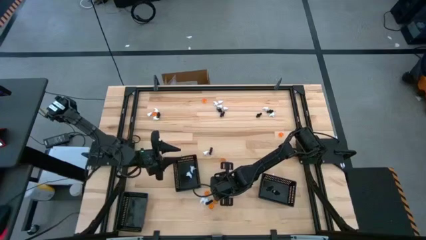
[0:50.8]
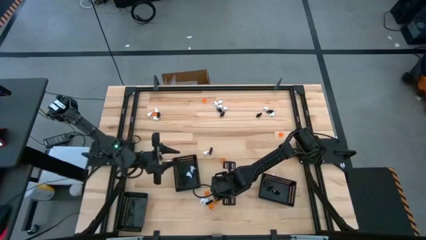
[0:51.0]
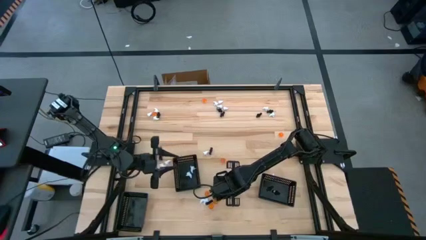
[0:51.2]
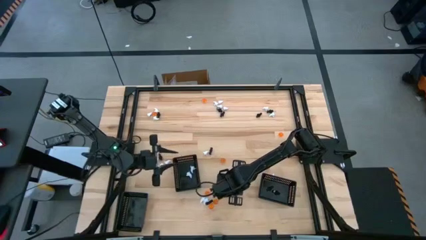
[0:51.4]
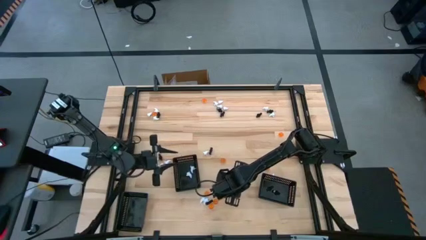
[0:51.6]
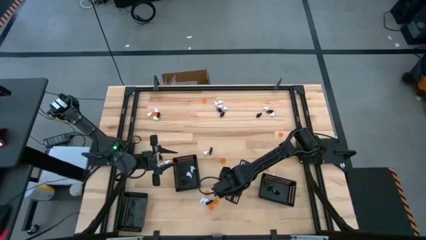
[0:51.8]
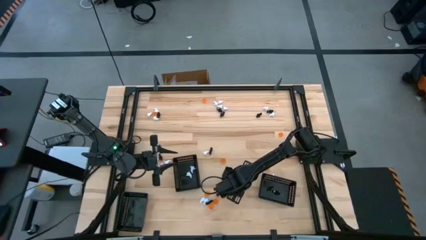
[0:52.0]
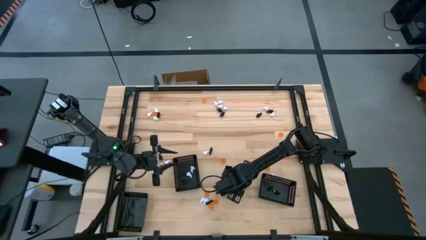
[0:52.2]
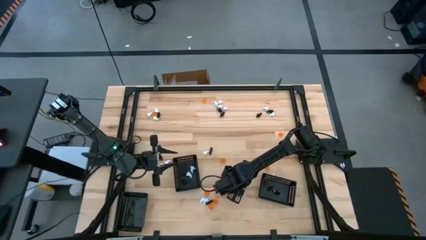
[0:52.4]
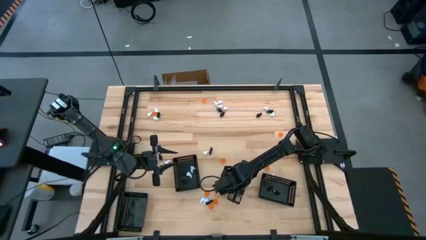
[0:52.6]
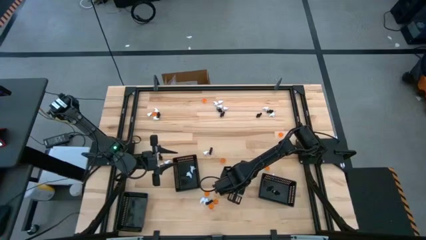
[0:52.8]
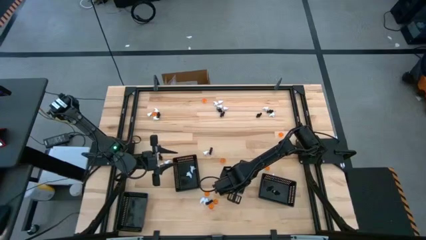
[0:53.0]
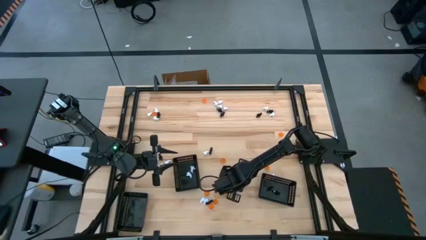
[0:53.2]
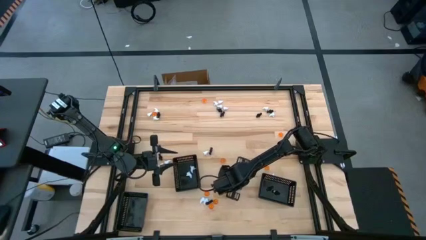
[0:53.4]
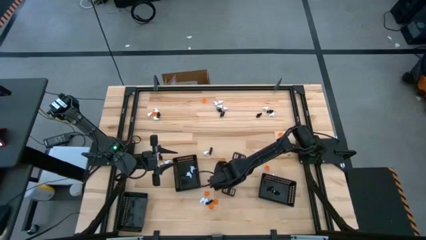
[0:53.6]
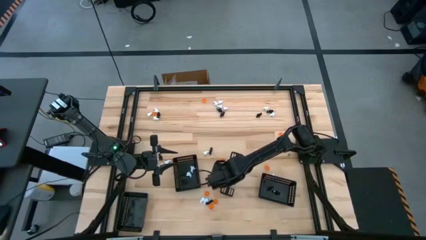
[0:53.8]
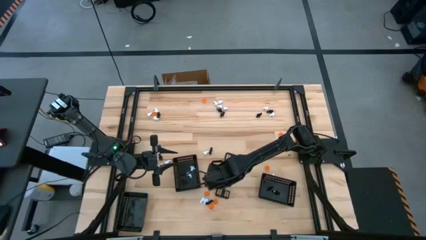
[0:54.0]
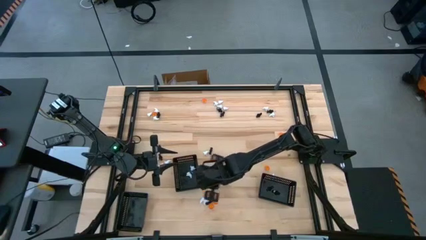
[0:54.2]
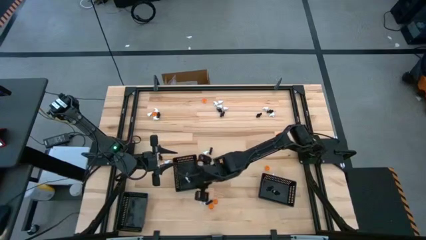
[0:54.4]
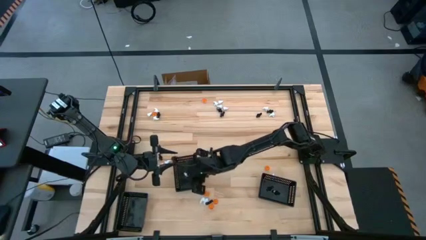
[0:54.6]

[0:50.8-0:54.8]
Task: Sort Halloween decoration
Put the white ghost toy into the middle black basket

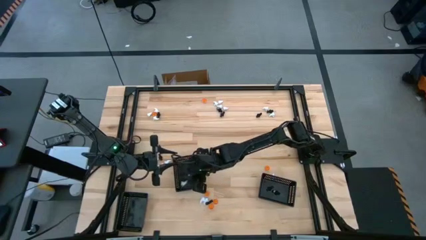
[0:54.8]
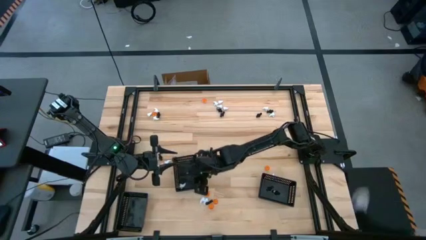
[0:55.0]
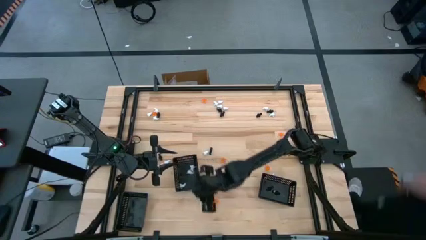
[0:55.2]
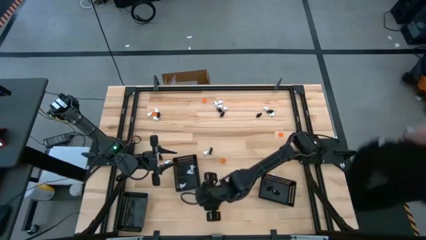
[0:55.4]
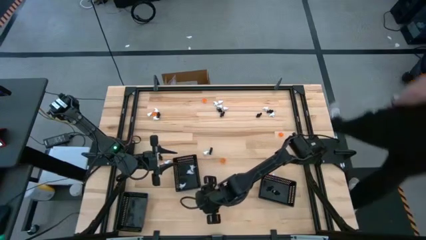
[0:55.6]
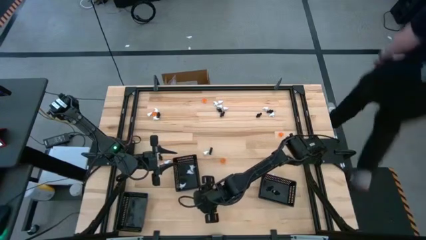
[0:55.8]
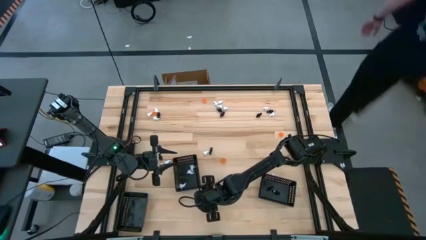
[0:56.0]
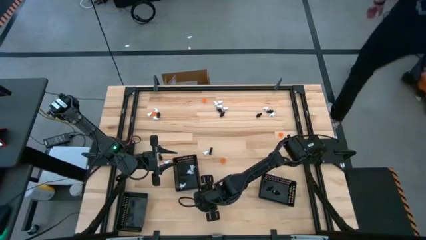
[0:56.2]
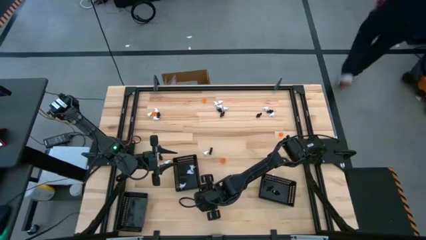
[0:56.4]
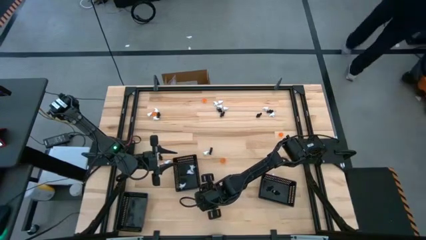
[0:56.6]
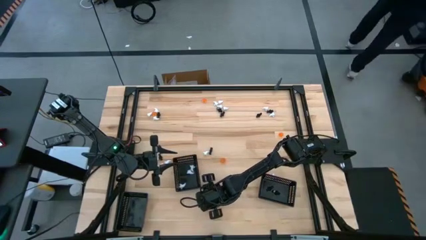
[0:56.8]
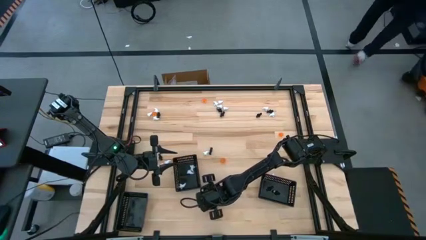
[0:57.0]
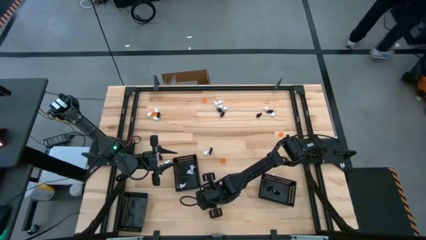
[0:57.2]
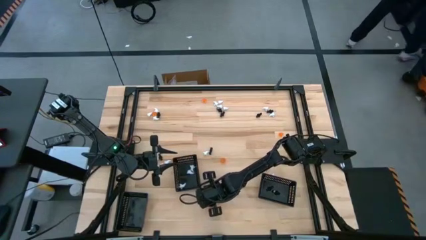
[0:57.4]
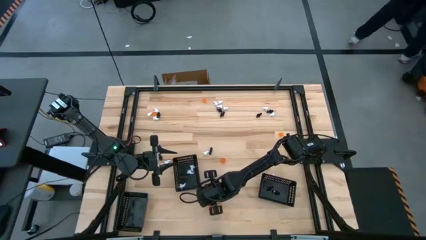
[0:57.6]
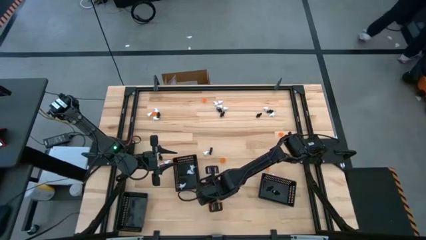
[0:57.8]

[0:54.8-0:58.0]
Put the orange pumpkin toy into the left black basket

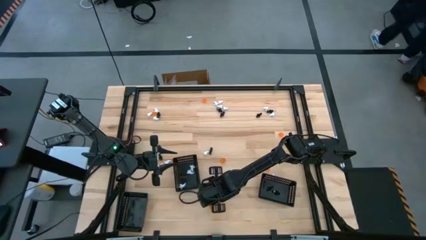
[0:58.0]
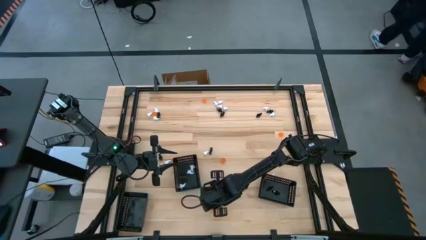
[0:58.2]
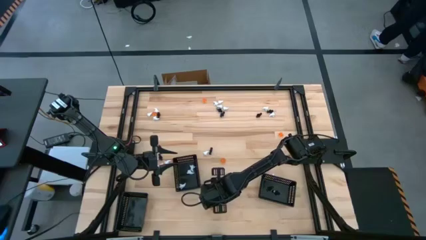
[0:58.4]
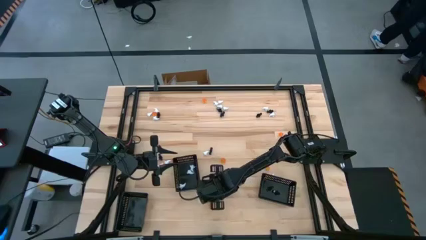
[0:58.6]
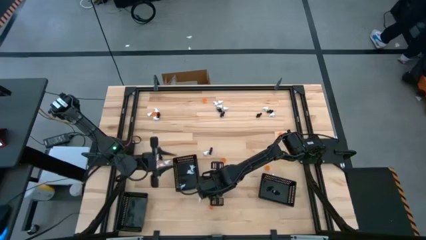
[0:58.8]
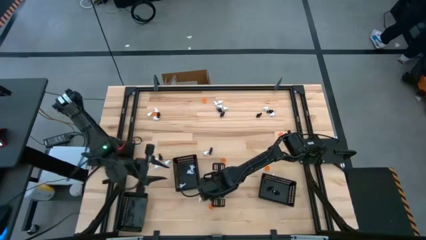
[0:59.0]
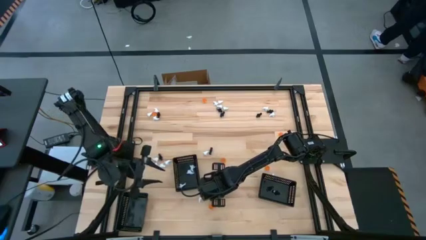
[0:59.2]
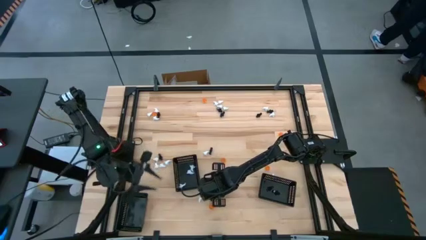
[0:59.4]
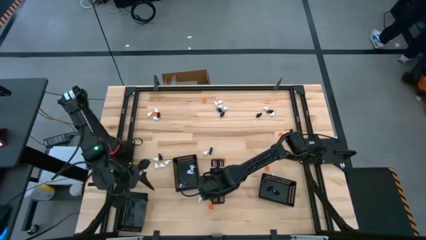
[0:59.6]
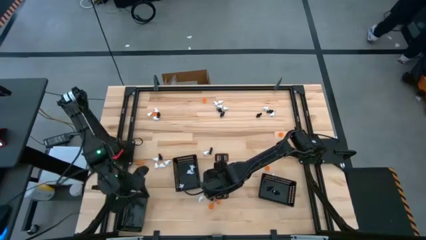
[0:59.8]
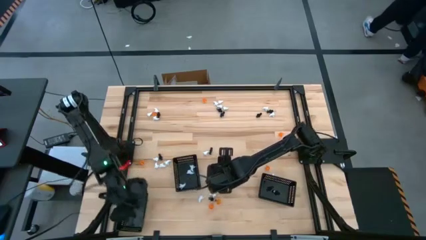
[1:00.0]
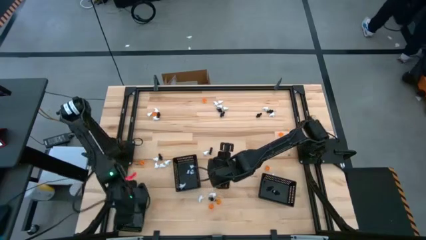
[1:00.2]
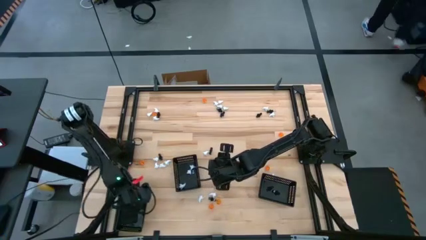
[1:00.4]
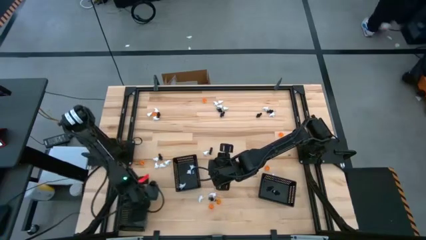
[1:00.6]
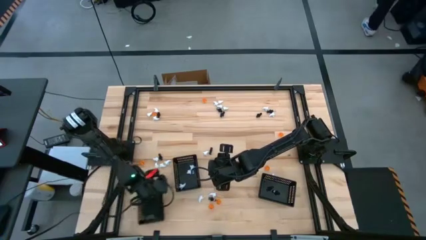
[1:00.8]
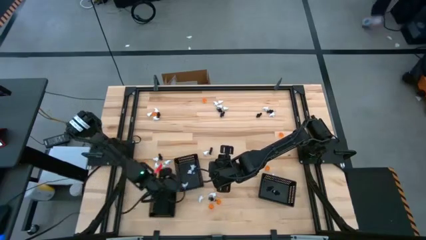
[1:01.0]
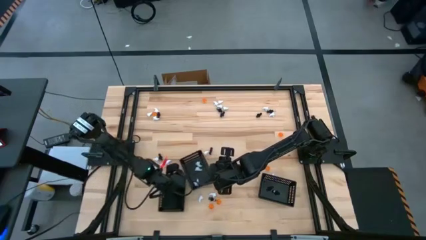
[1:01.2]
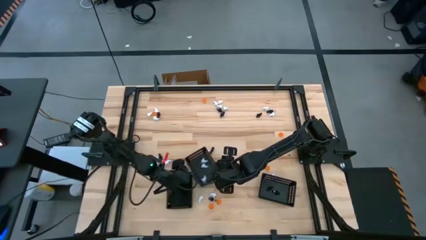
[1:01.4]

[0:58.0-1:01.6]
Adjust the left black basket

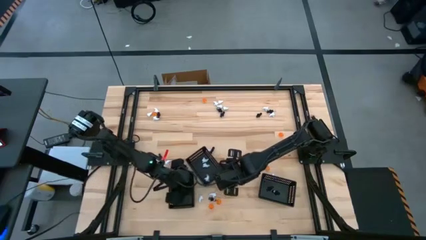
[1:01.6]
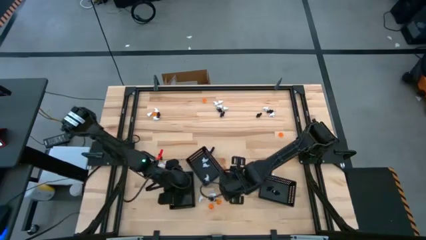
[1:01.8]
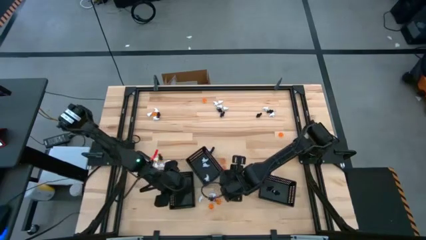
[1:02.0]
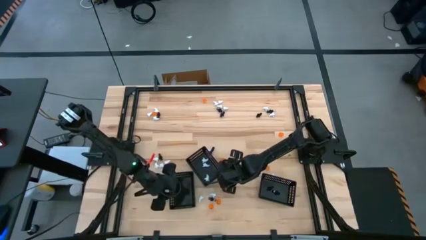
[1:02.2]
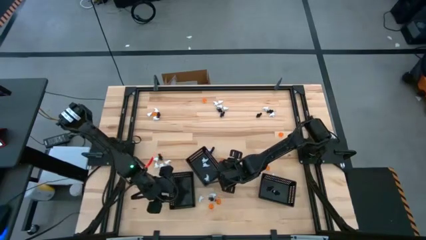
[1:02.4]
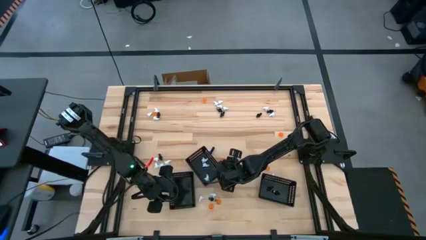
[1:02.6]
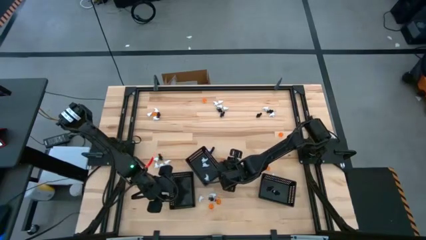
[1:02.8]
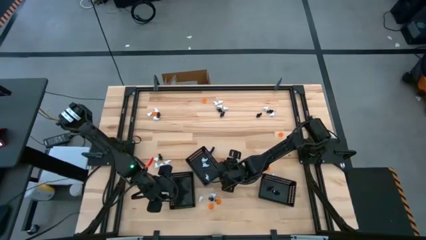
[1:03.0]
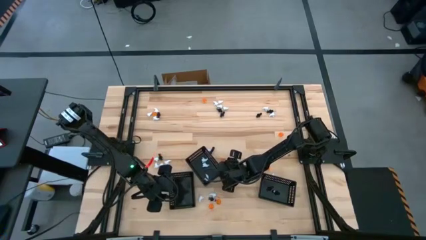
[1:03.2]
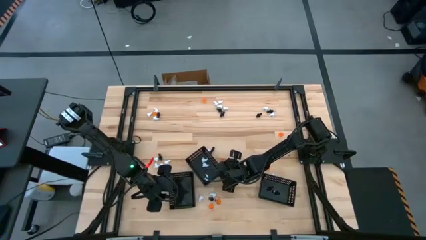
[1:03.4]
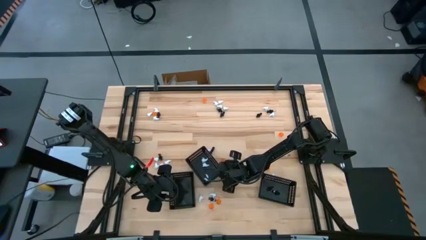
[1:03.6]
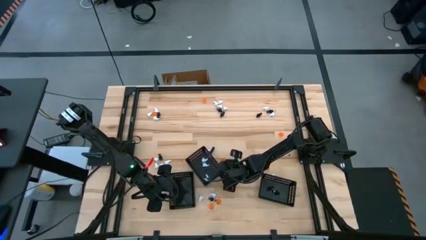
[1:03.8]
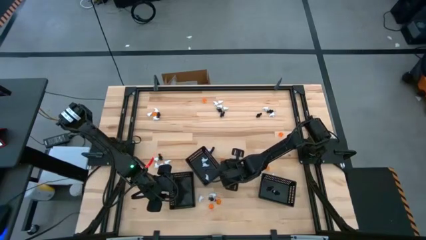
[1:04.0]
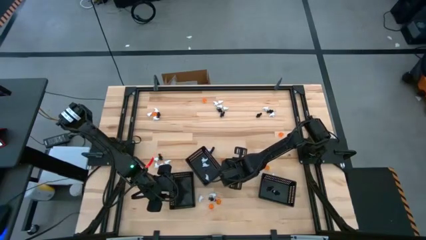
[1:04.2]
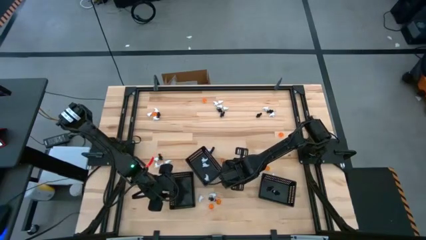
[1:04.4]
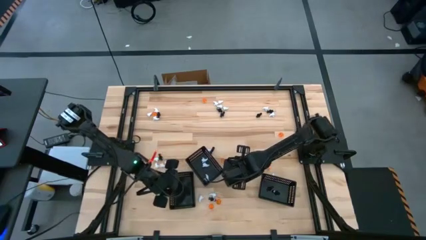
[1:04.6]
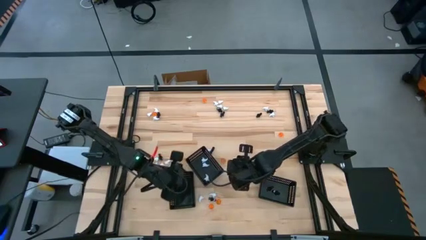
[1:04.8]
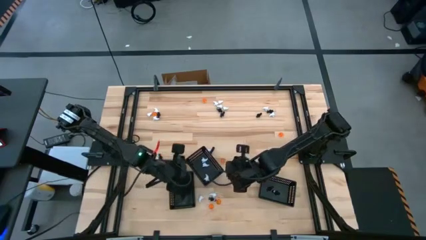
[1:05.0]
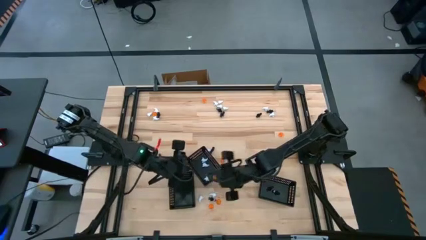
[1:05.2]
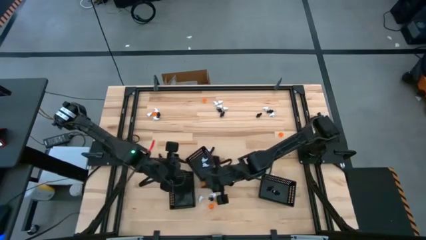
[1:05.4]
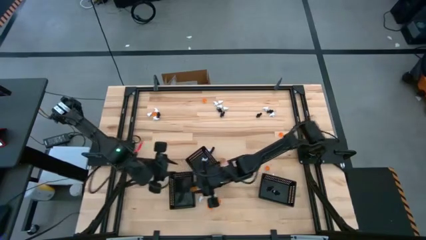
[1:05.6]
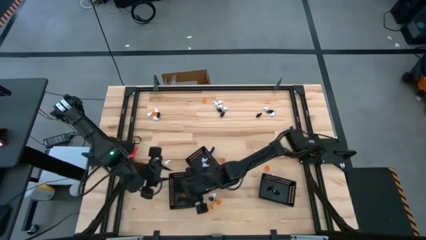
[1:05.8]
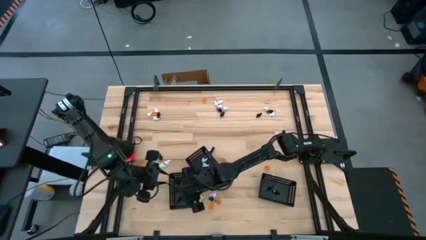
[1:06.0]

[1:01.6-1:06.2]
Put the orange pumpkin toy into the left black basket

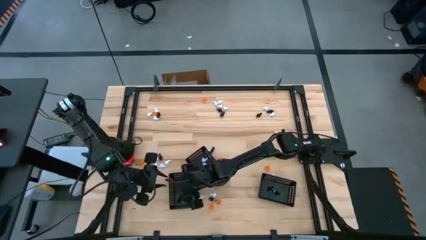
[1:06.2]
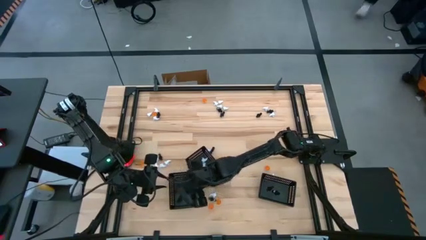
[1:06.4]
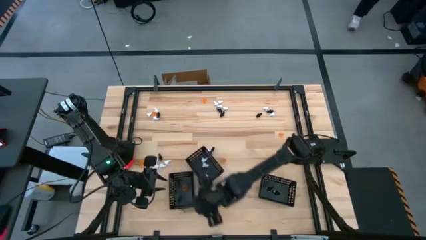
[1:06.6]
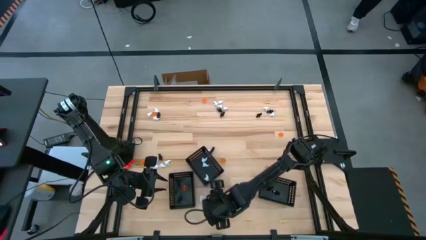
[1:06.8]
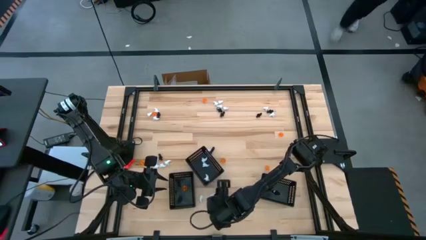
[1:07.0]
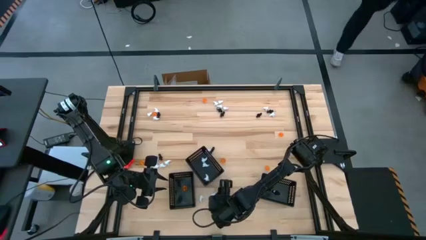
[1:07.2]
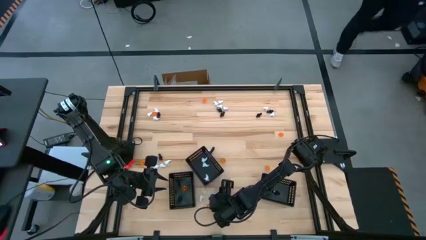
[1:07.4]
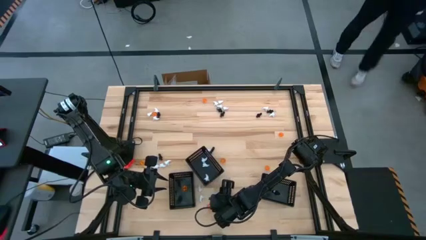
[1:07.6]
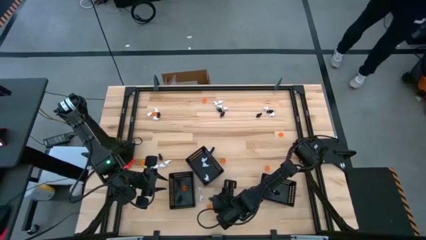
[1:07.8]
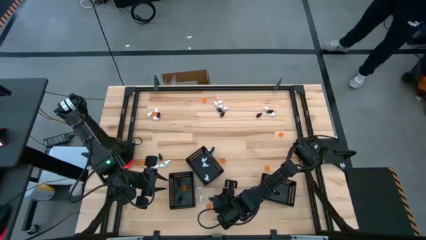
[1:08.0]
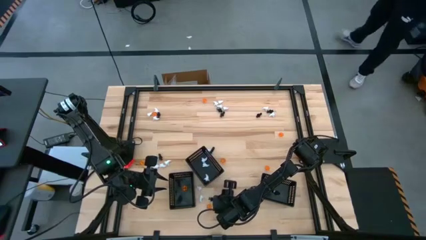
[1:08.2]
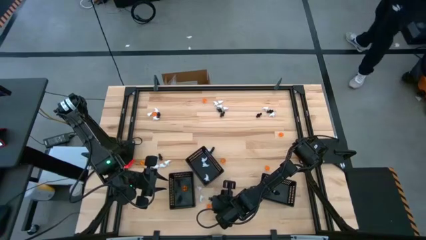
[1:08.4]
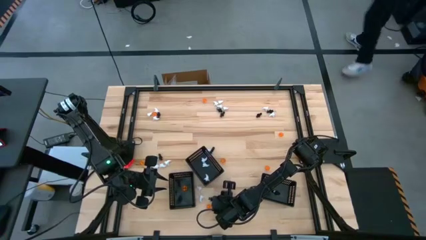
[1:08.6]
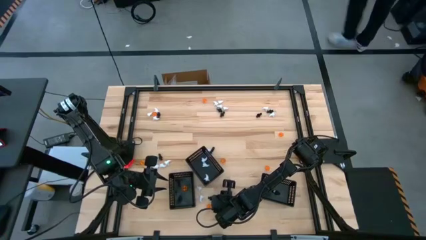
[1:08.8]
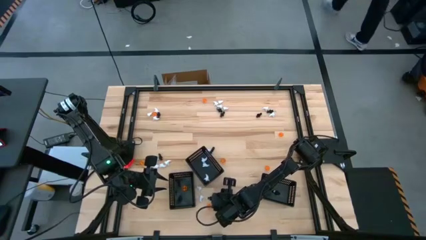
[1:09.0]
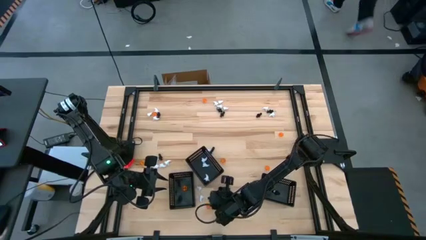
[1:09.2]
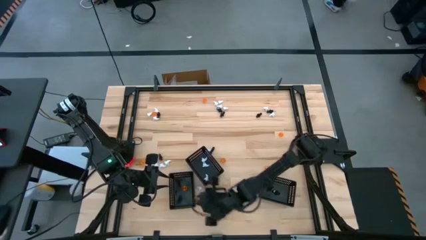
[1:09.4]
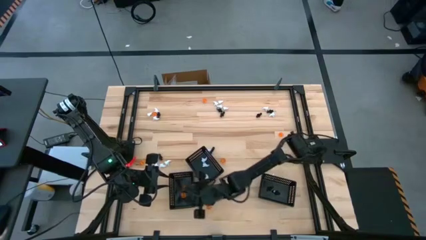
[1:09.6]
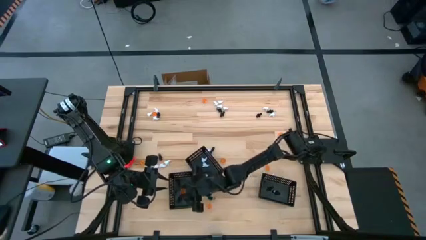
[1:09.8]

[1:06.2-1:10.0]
Put the orange pumpkin toy into the left black basket
